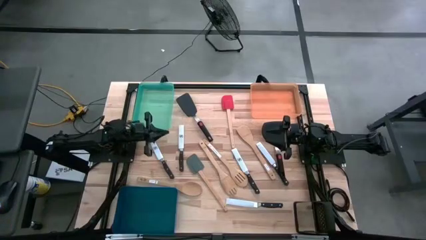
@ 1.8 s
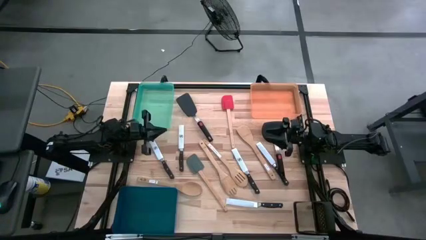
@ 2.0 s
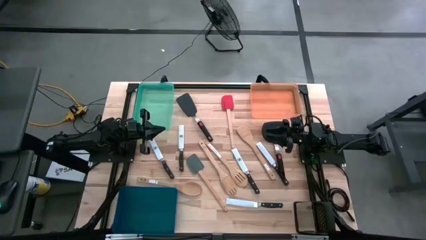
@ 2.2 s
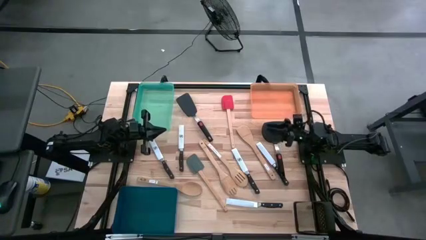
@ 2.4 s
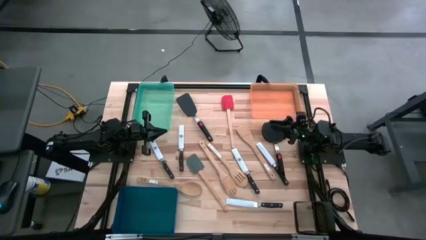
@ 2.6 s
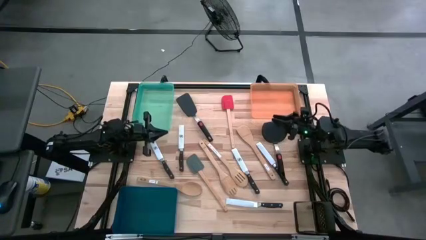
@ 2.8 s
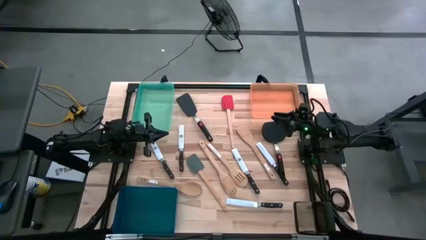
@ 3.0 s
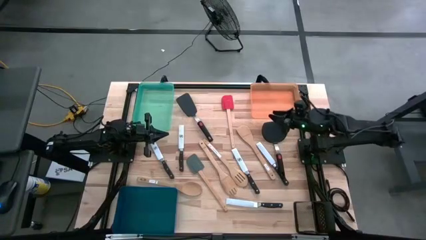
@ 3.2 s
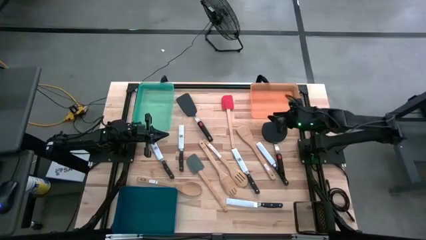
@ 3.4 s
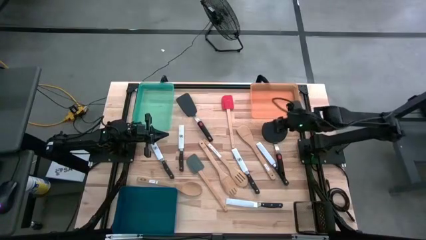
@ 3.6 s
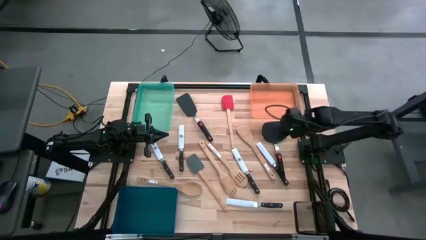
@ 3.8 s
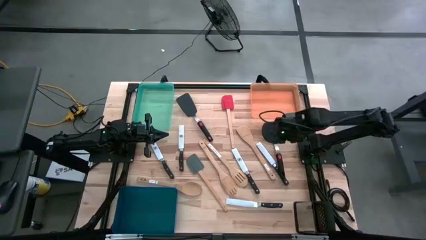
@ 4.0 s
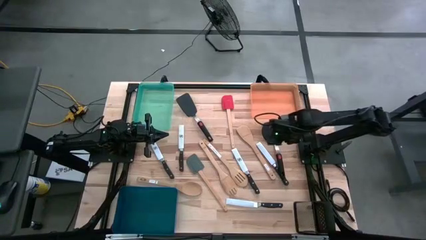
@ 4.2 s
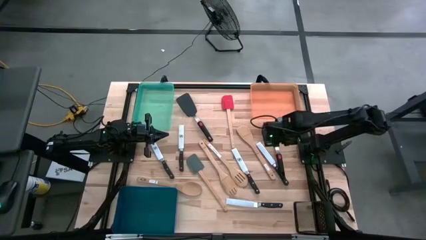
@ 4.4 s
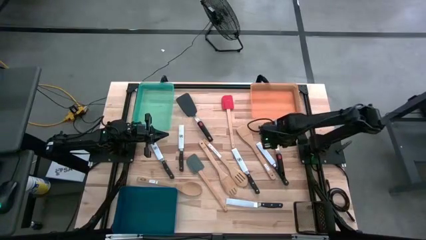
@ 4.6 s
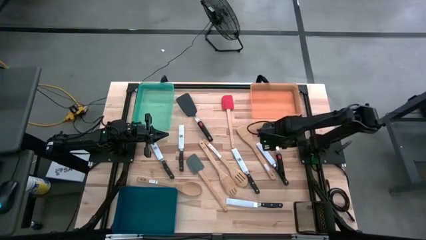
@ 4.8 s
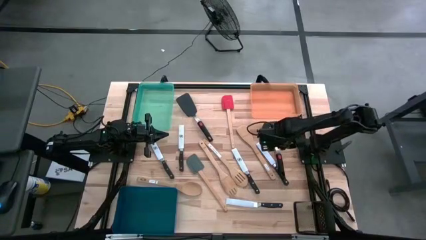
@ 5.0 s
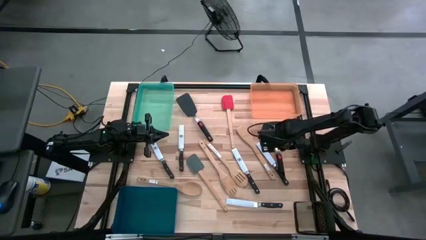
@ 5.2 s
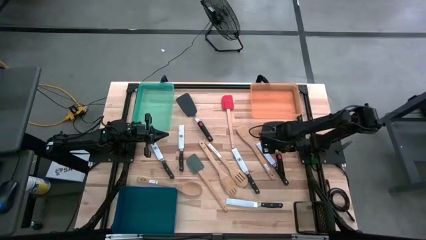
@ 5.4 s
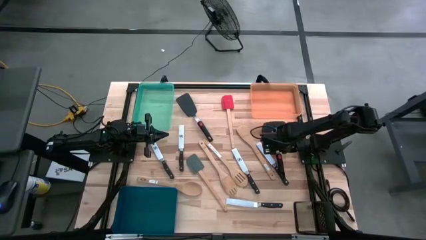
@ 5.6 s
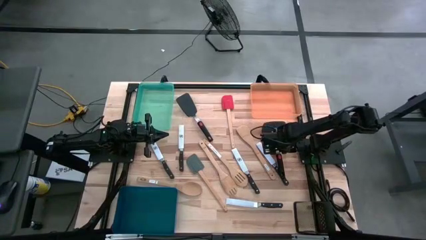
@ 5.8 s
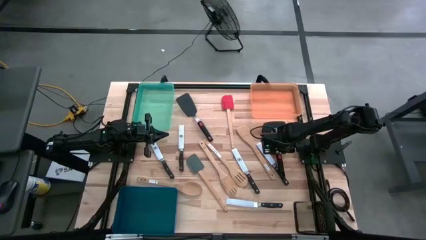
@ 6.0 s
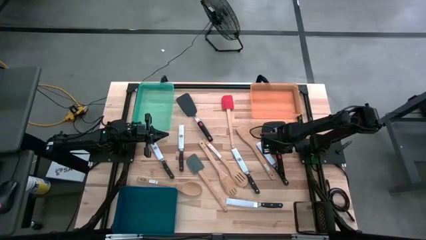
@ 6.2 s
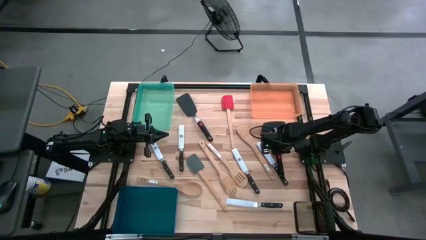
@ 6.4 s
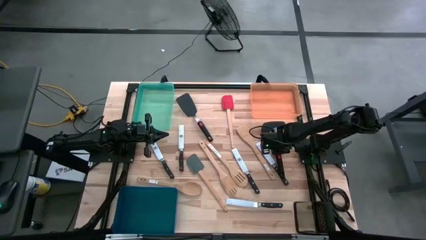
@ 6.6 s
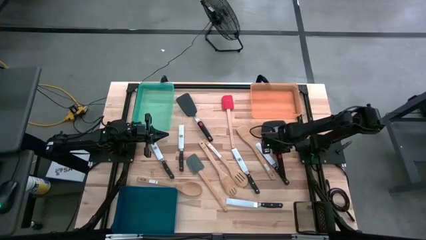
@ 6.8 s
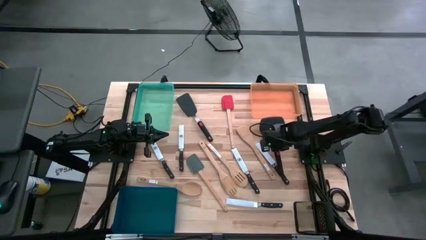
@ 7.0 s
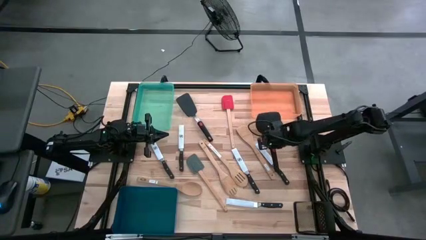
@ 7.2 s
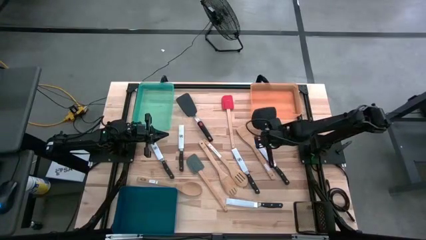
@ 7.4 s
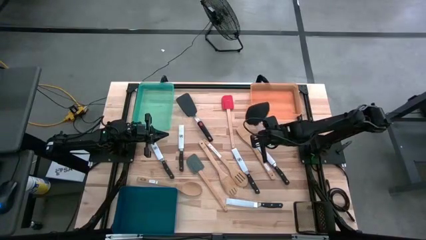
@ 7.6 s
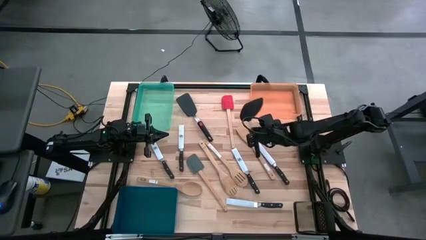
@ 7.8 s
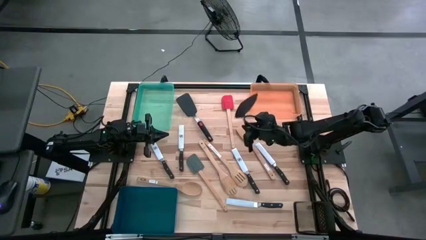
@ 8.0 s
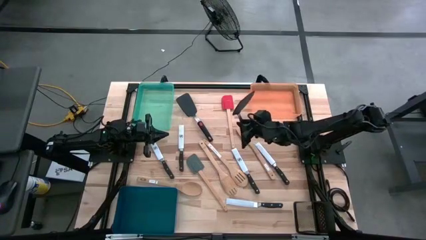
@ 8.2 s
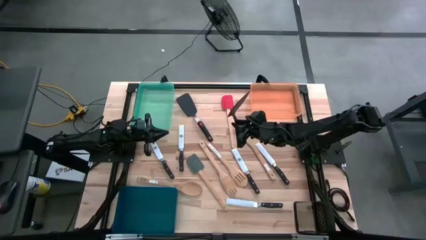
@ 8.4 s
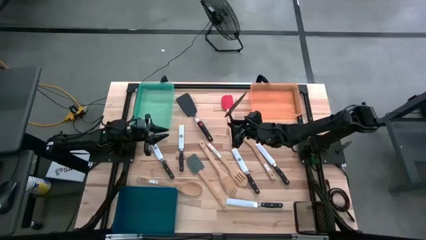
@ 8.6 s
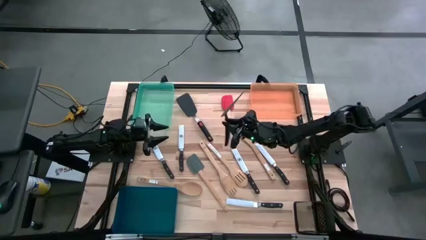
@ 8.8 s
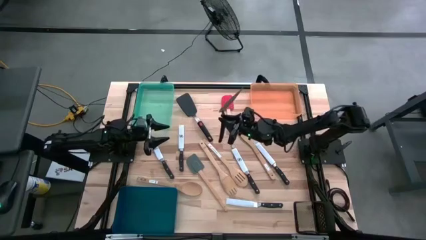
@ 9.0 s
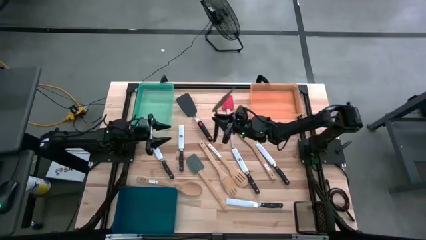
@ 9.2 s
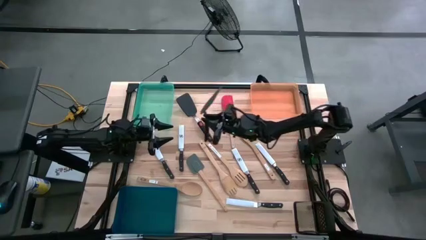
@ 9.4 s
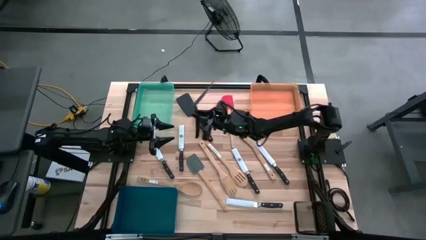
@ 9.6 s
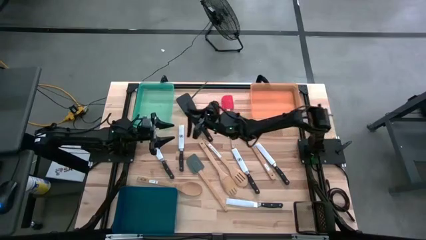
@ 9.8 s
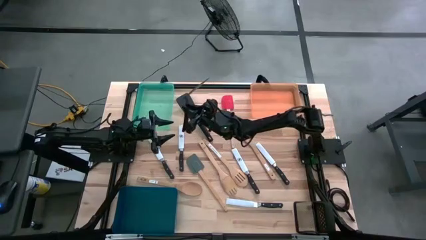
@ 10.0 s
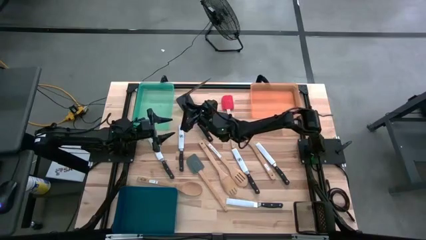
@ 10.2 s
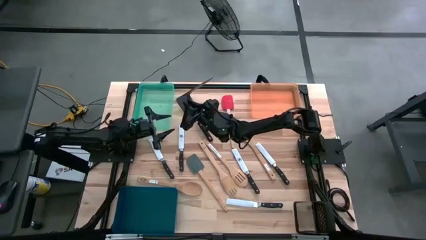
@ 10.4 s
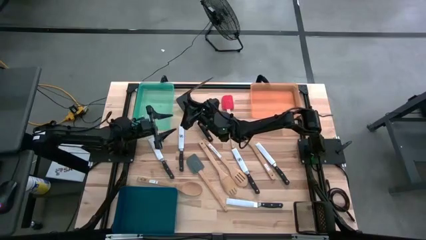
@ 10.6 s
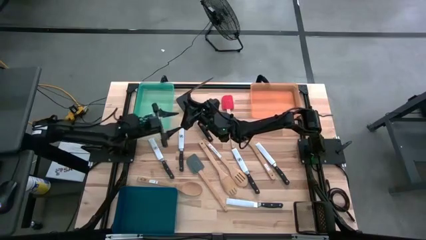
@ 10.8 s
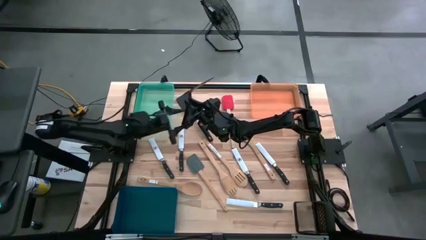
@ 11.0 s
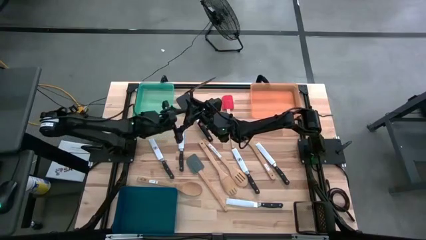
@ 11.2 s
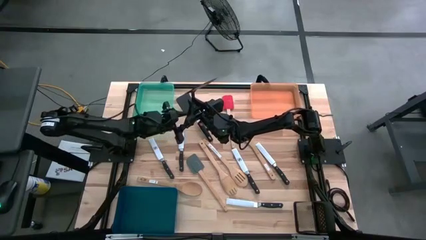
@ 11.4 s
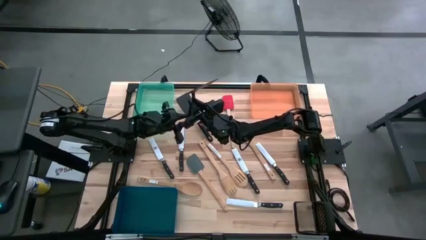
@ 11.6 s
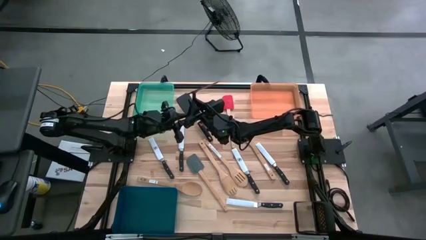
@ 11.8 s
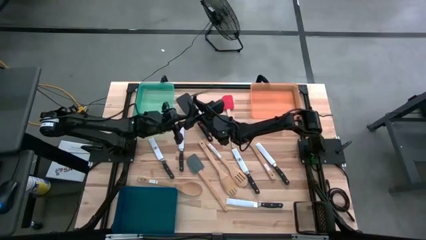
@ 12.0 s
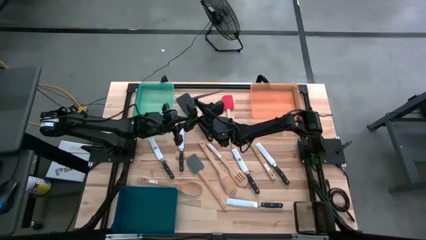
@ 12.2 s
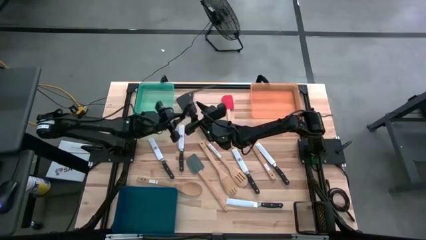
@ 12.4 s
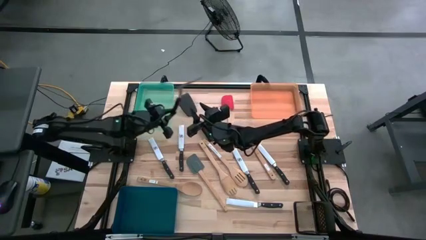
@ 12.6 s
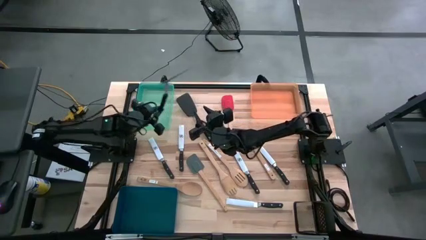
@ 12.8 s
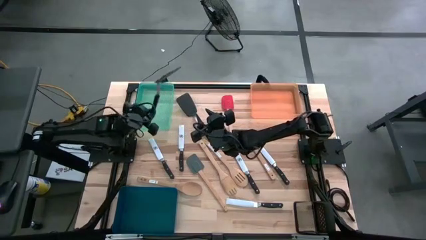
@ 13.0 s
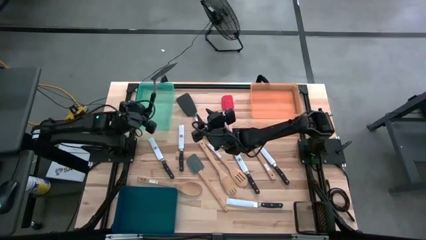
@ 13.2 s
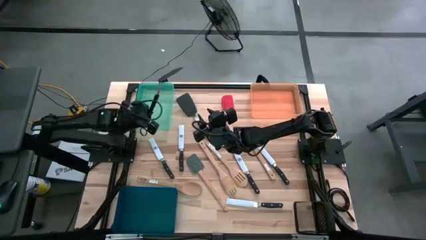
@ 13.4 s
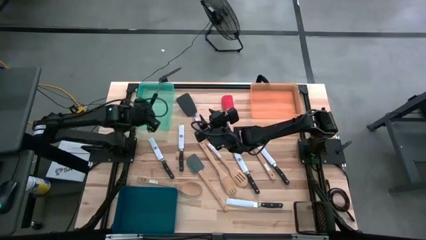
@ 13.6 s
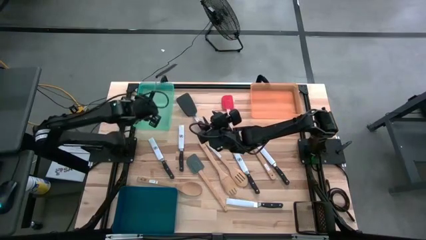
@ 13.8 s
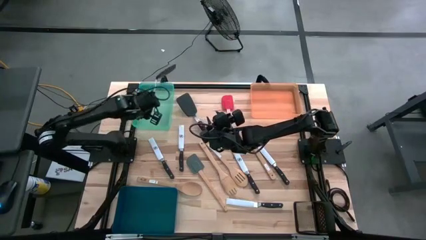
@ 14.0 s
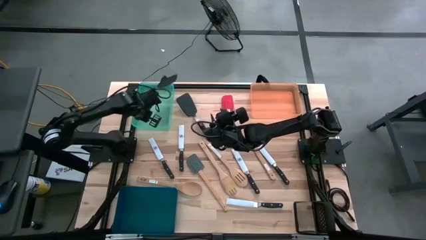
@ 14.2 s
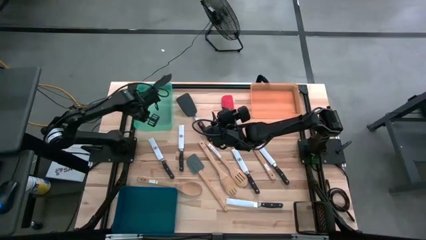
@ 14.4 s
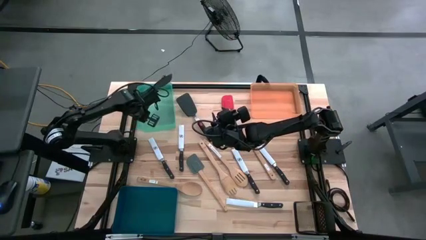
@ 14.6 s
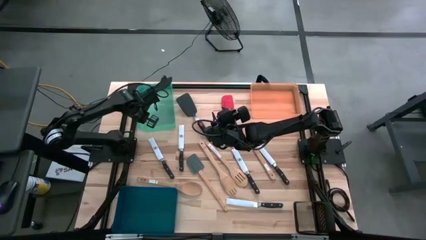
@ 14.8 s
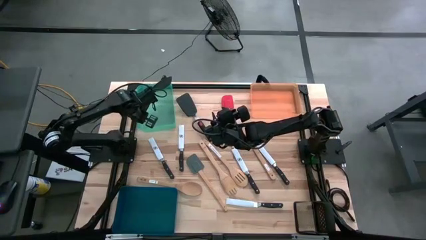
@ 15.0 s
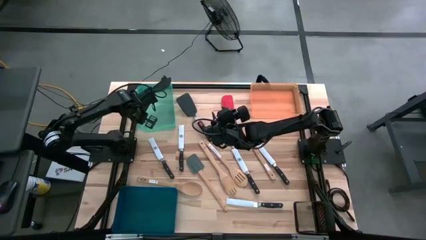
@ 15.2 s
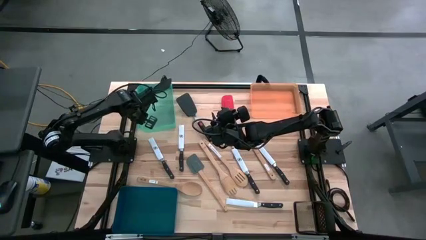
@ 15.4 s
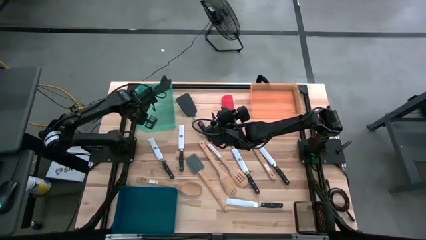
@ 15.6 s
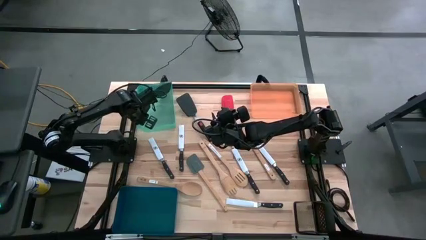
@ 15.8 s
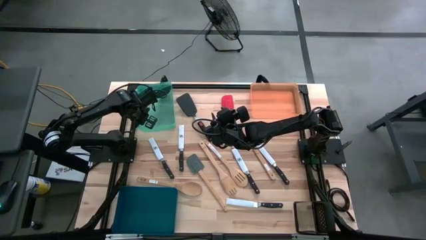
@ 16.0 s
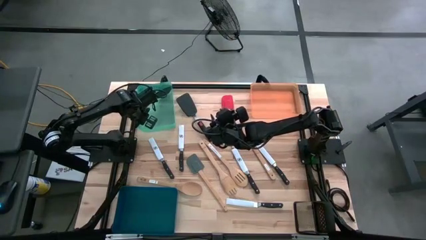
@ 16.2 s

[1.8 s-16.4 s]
Task: Pick & Place Kitchen Items
Put the black wide spatula into the blue green bin
